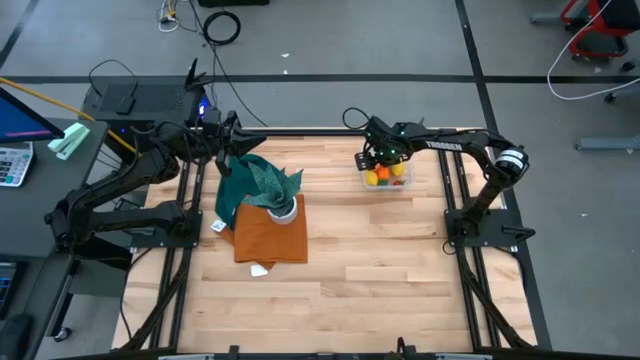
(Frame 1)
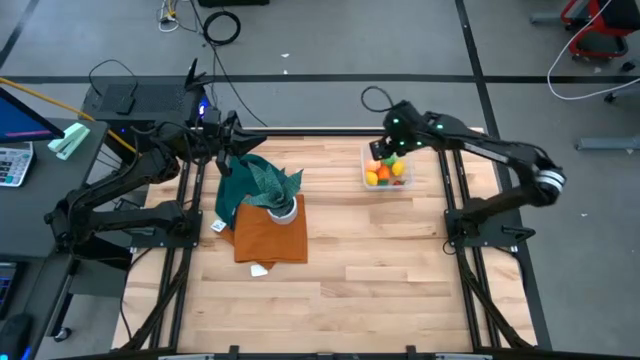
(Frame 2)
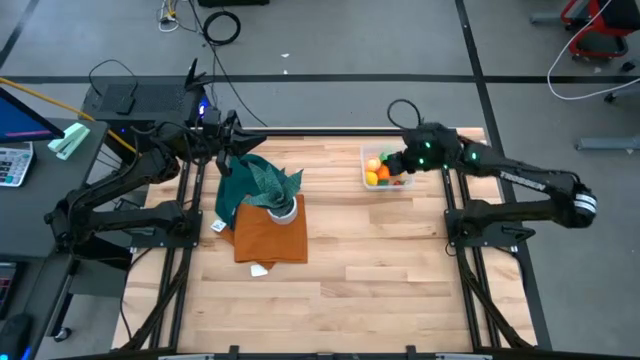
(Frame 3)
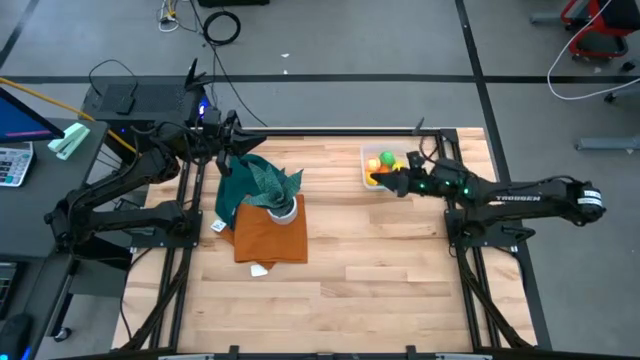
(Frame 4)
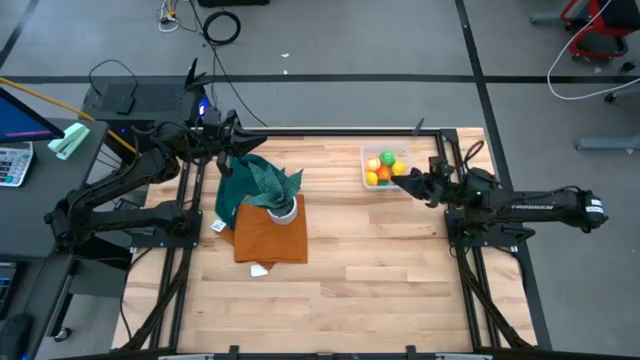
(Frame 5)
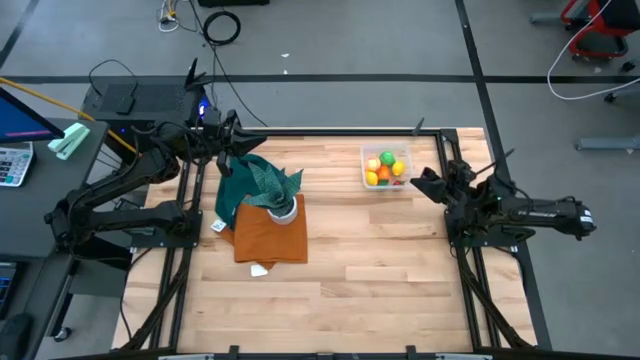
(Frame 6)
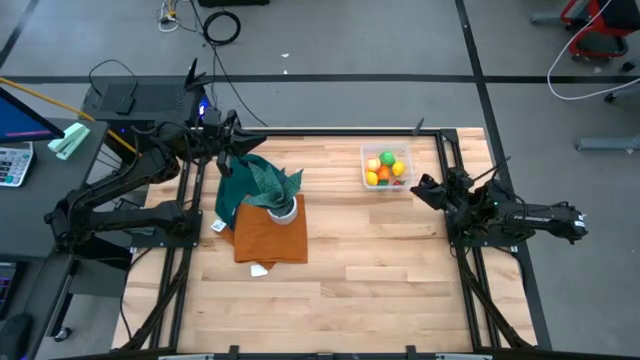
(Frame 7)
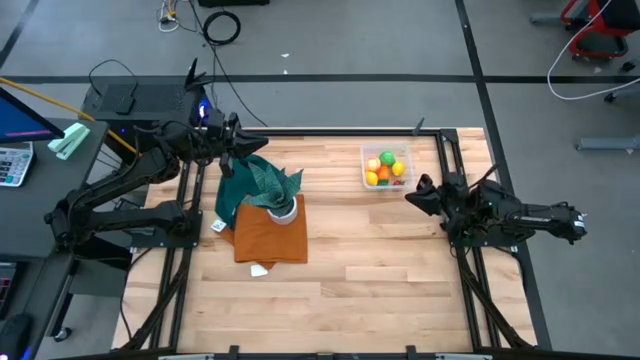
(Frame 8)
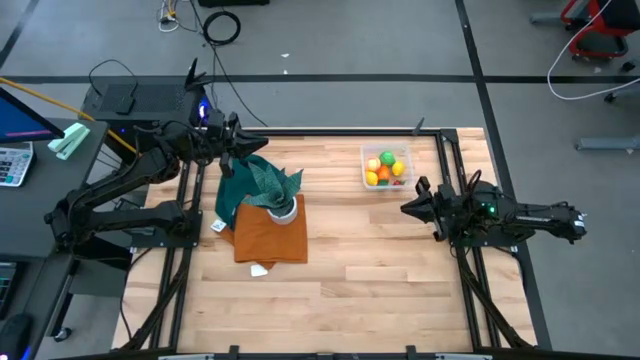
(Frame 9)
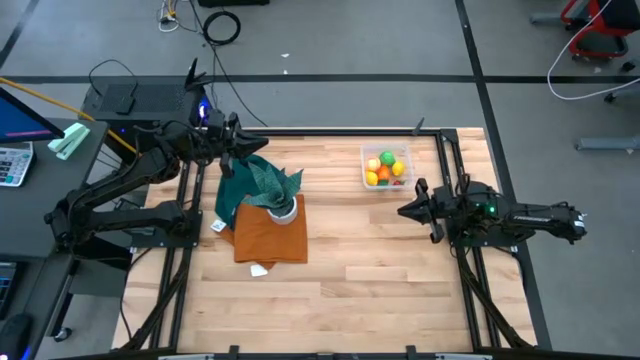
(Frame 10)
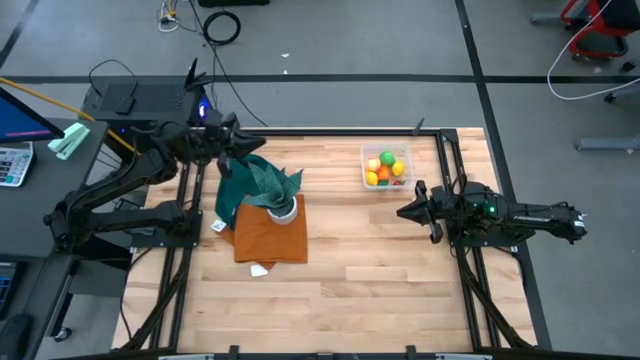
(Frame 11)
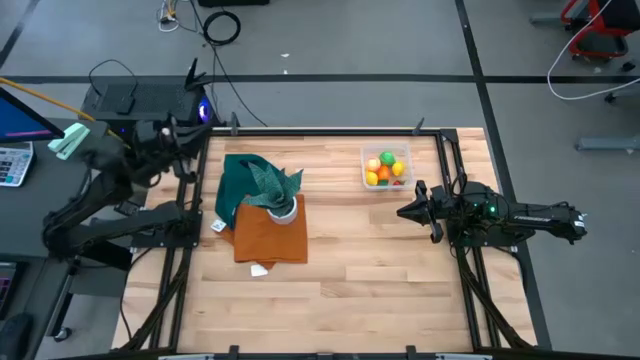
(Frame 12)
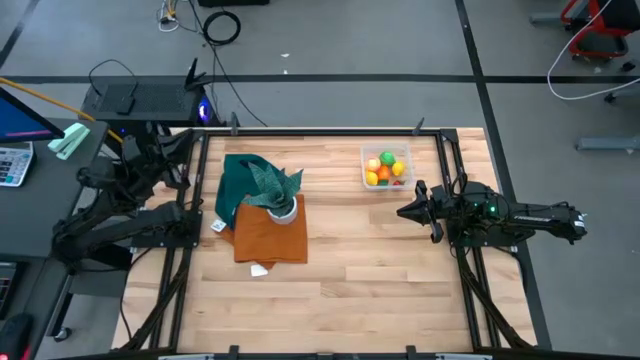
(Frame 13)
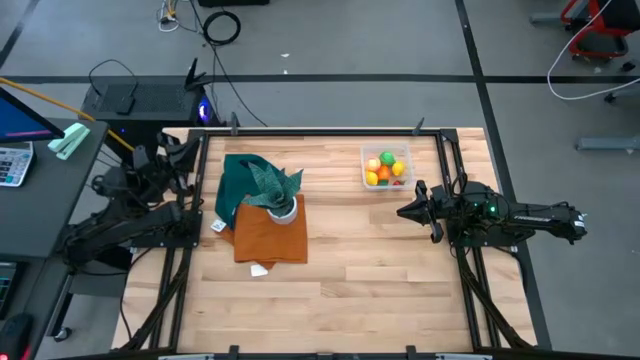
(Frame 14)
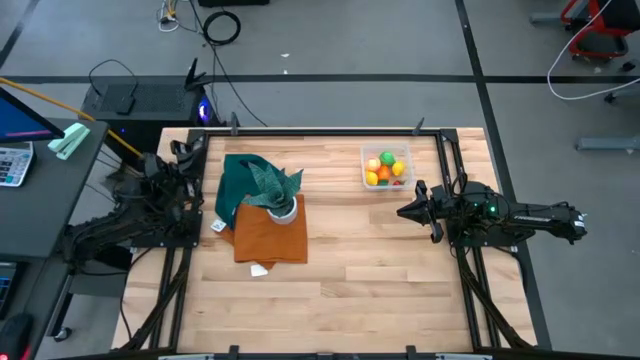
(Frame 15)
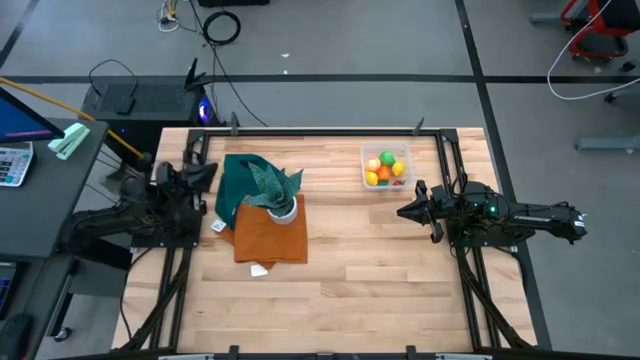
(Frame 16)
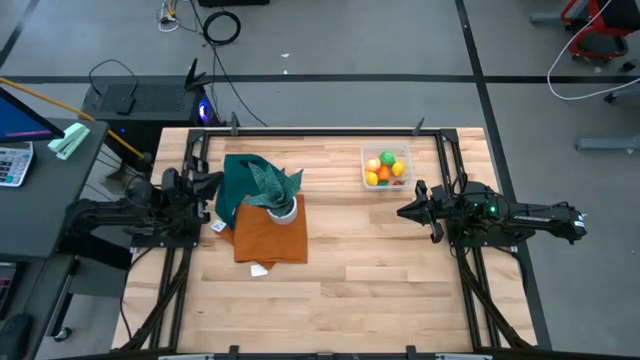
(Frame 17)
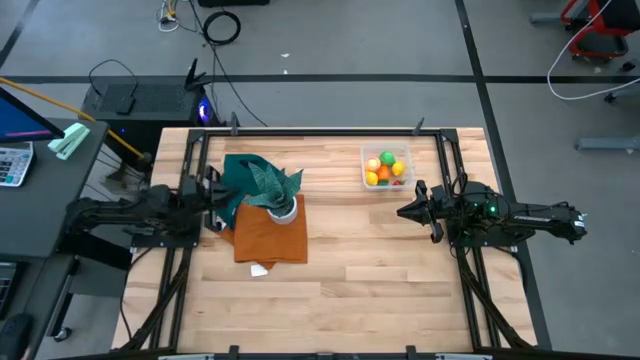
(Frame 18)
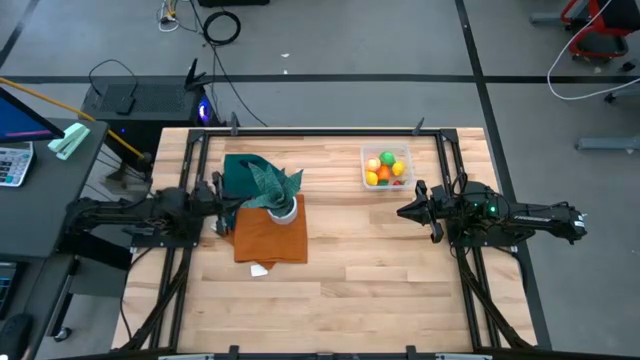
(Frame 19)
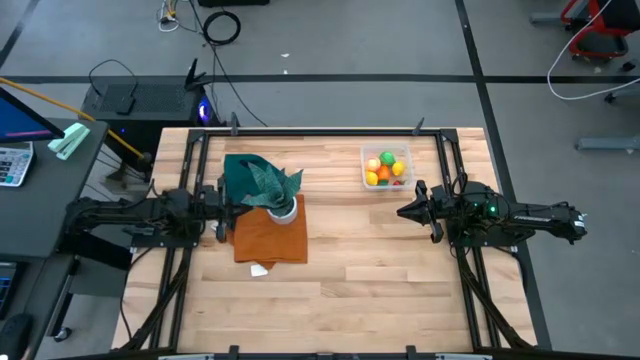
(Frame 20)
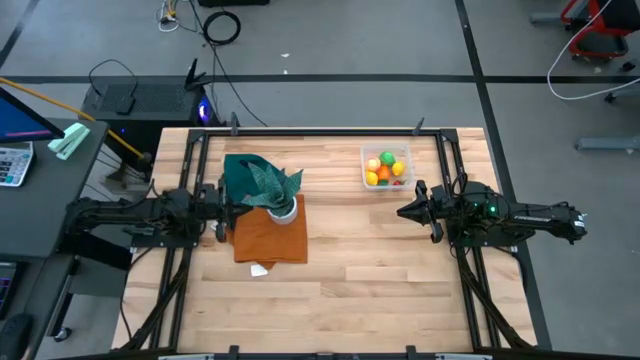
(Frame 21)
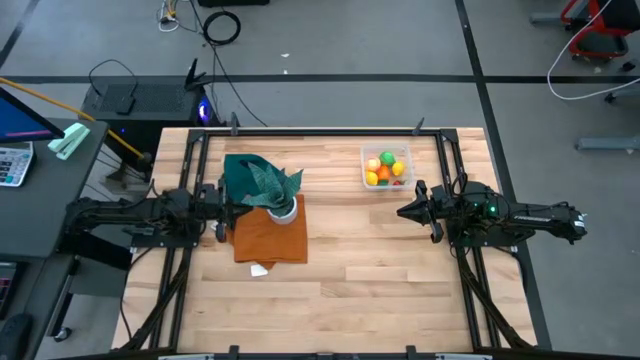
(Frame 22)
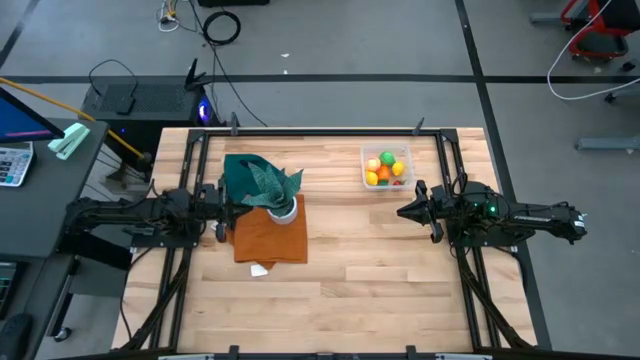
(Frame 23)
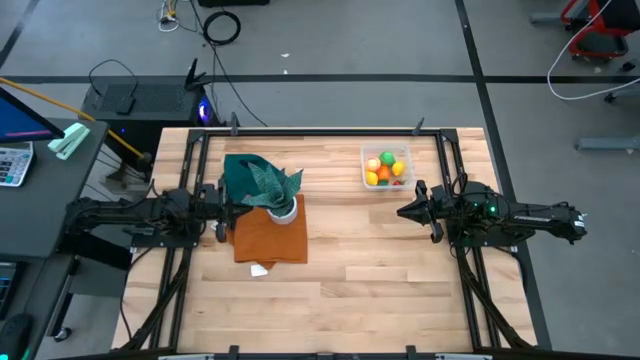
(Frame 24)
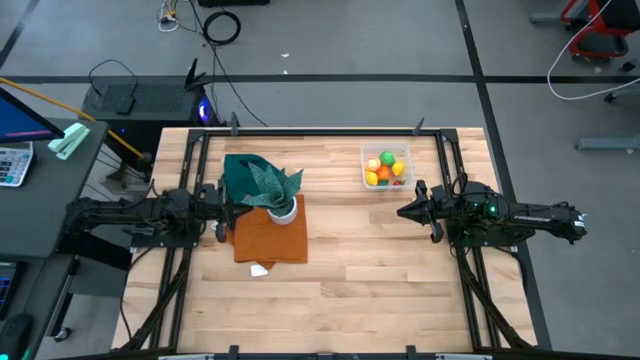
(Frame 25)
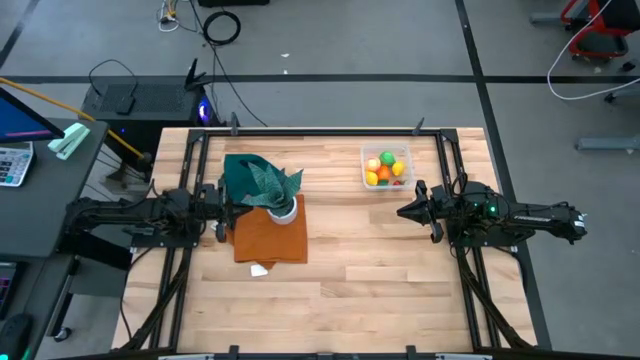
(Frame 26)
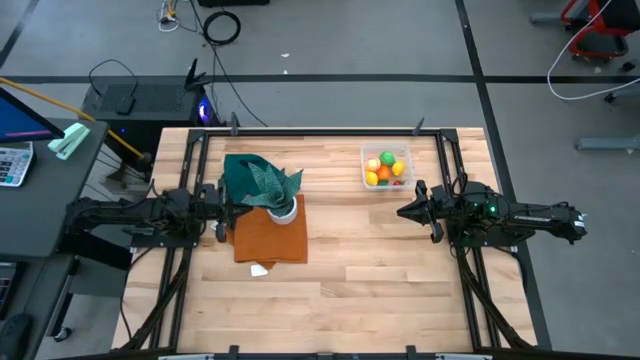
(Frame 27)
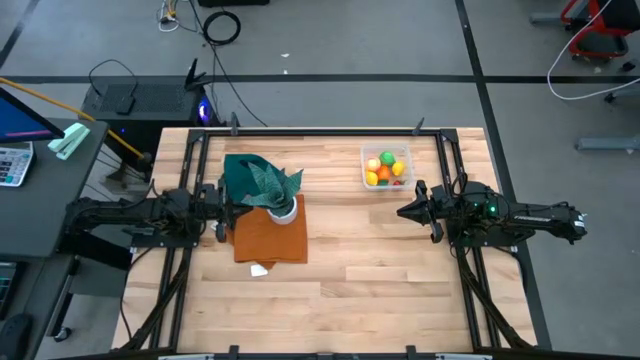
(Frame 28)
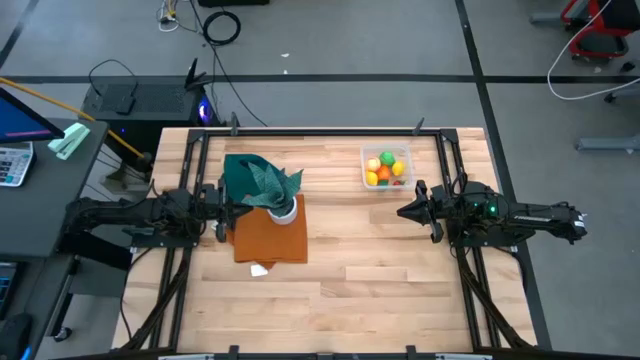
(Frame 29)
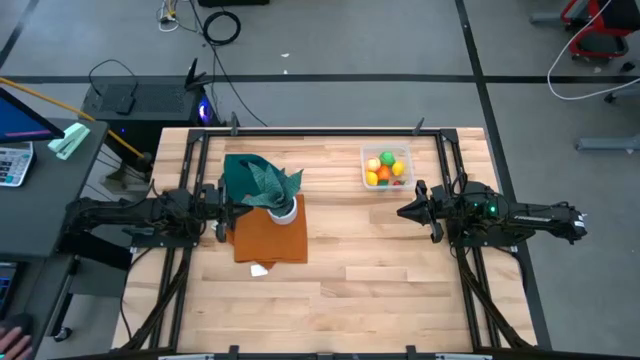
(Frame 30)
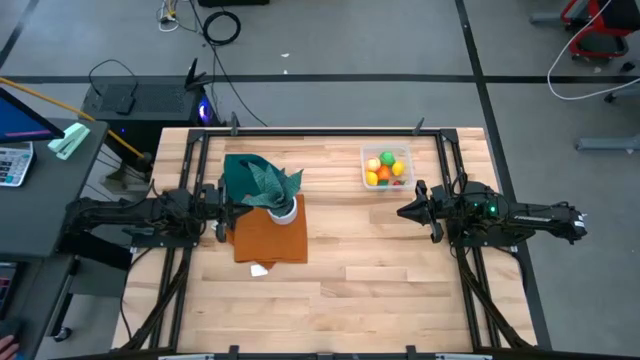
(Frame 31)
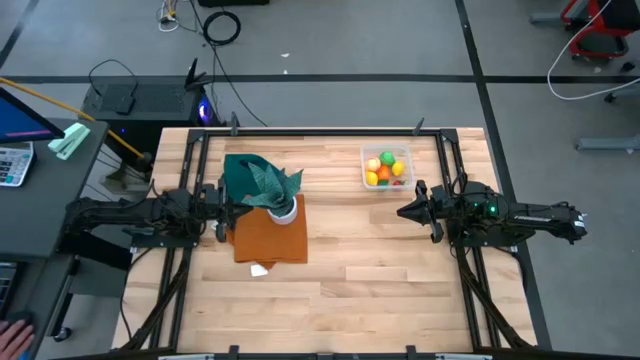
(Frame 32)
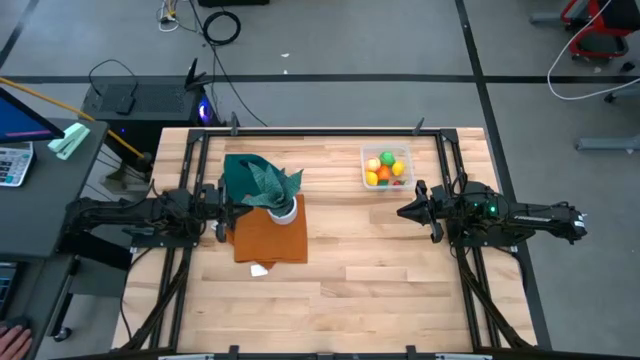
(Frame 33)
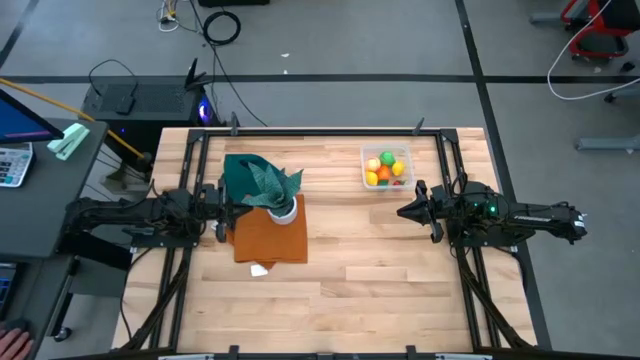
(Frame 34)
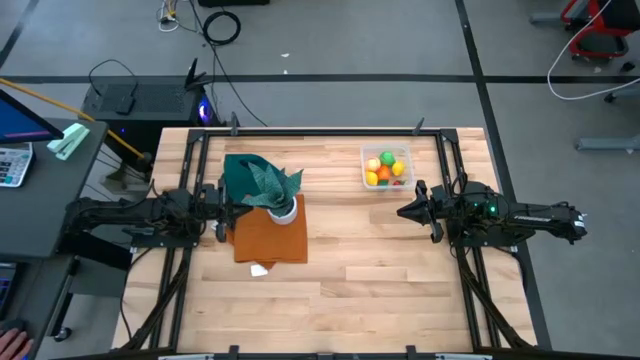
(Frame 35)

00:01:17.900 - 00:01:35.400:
Task: Pick and placing Produce into tupperware
Return to Home Position

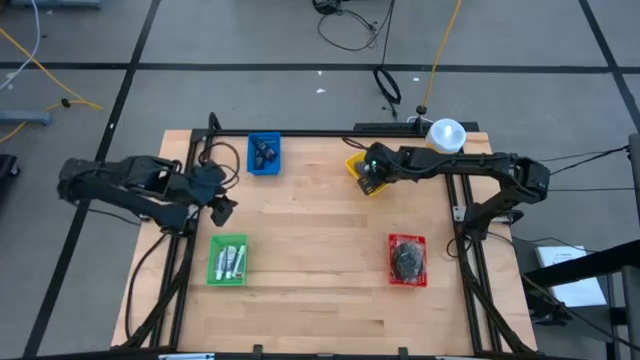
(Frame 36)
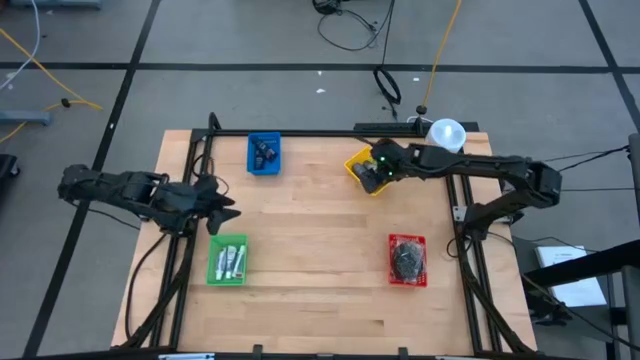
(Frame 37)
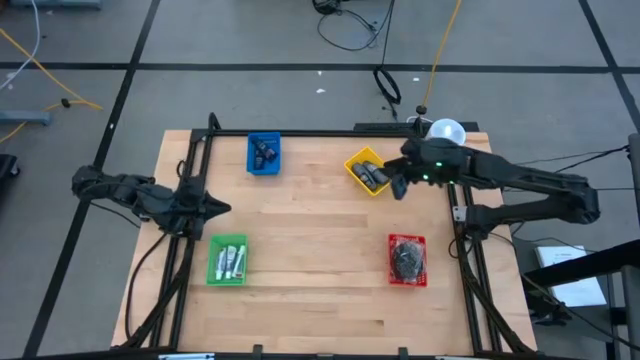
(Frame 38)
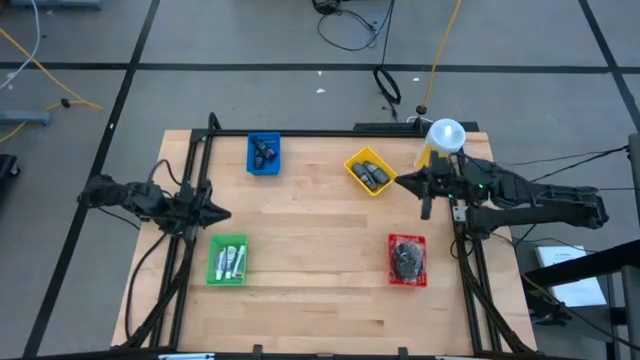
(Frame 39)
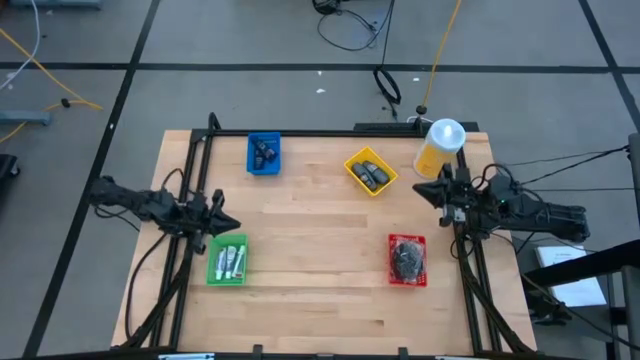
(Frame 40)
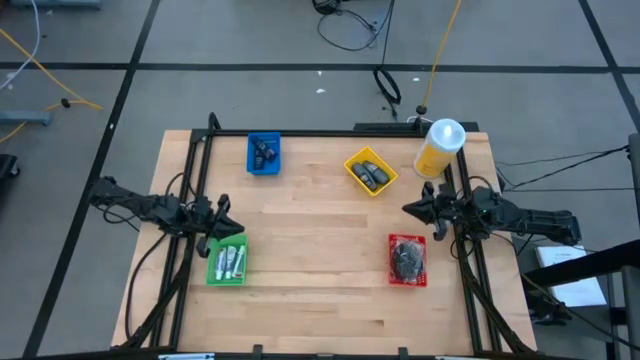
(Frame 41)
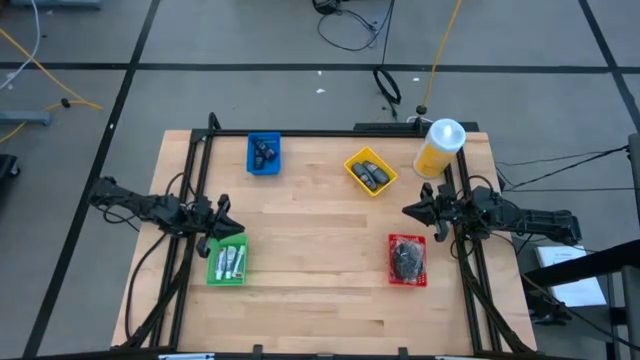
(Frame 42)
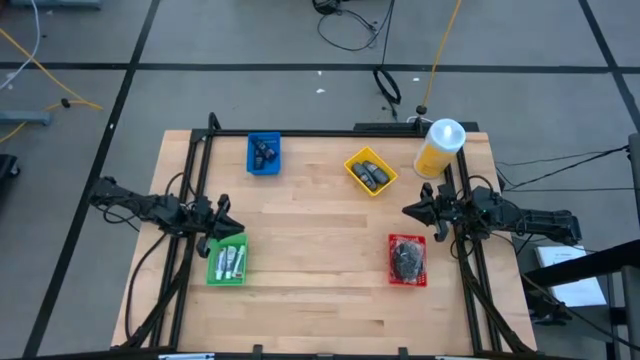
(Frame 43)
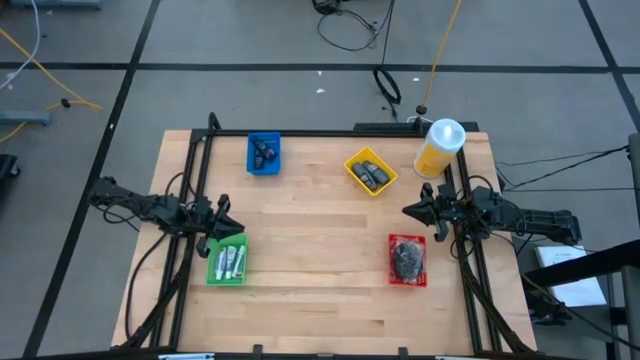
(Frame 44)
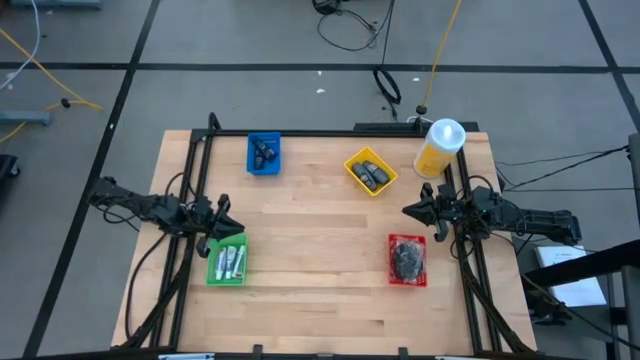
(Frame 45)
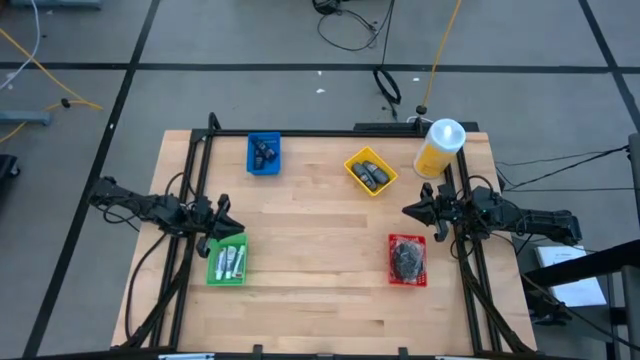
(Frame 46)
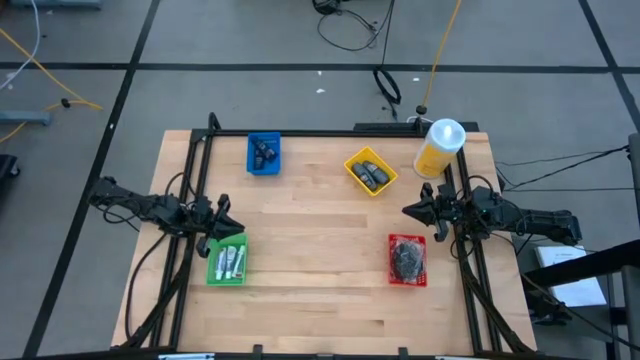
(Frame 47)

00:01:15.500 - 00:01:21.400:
Task: Pick & Place Travel size toiletries
Return to Home Position
